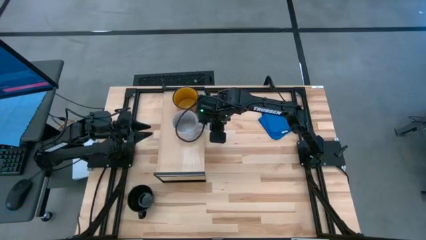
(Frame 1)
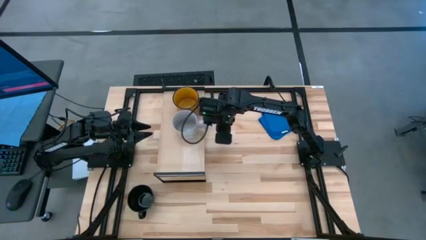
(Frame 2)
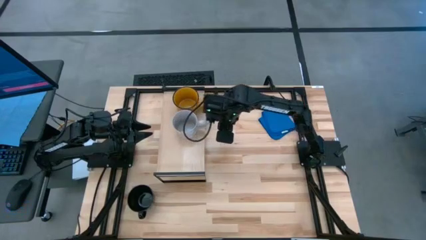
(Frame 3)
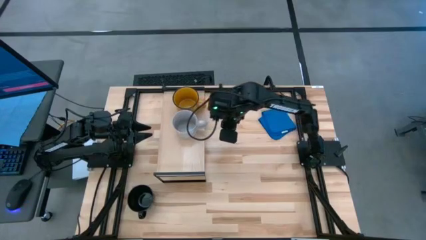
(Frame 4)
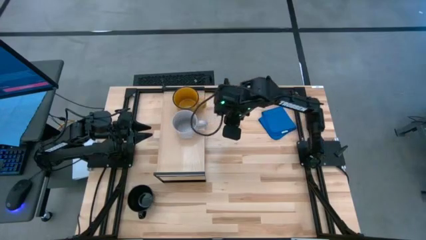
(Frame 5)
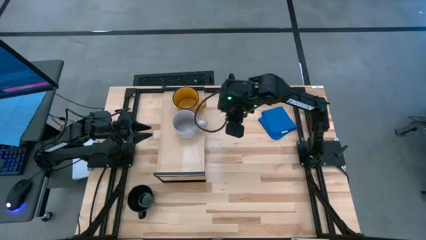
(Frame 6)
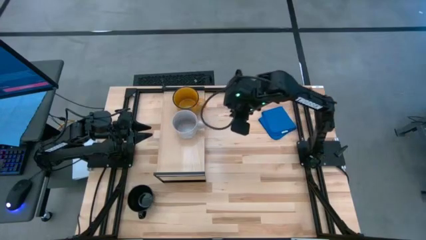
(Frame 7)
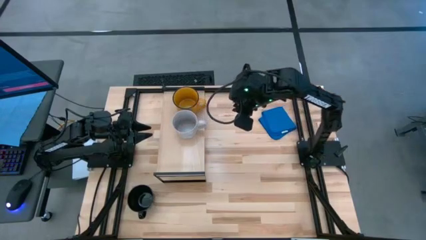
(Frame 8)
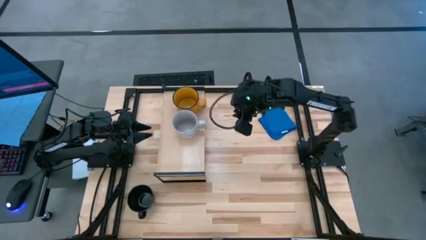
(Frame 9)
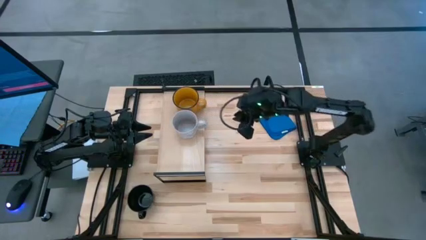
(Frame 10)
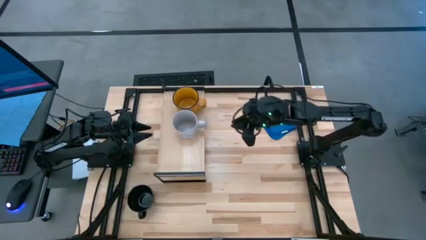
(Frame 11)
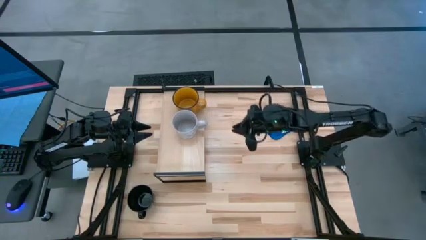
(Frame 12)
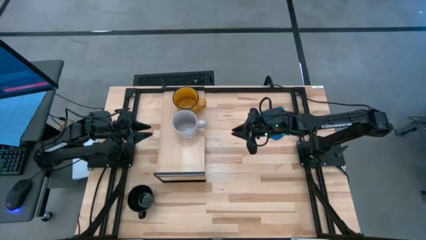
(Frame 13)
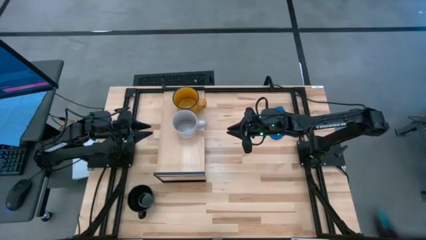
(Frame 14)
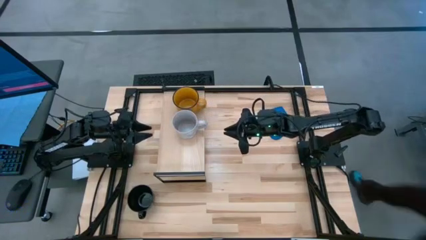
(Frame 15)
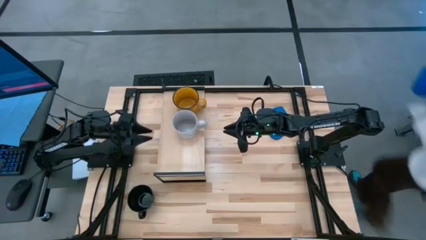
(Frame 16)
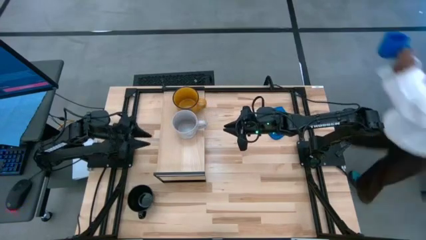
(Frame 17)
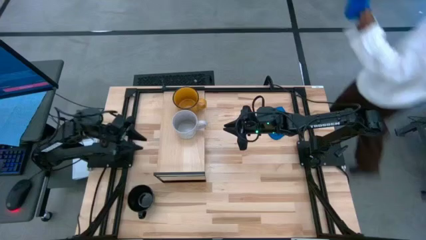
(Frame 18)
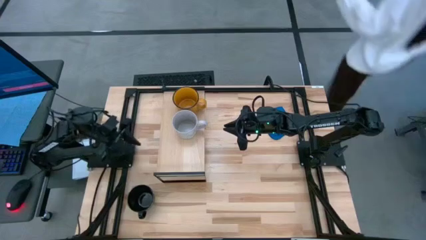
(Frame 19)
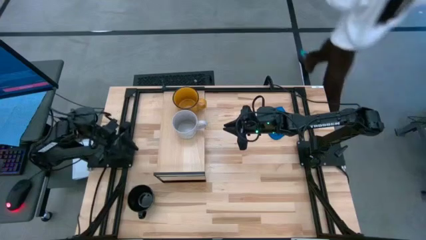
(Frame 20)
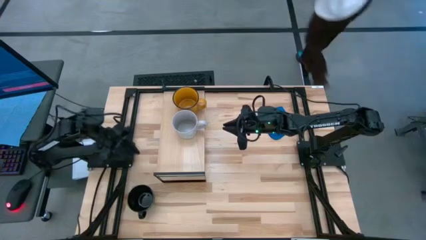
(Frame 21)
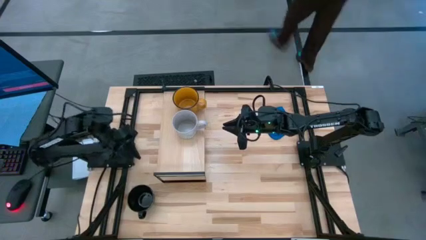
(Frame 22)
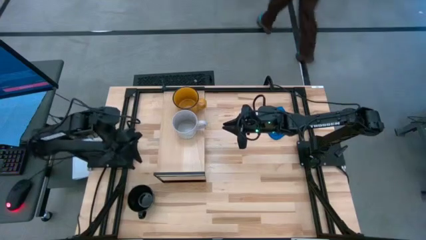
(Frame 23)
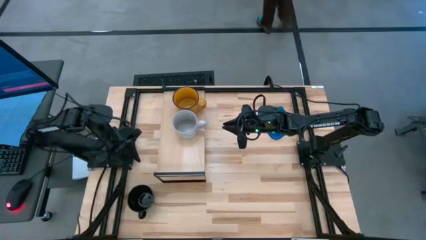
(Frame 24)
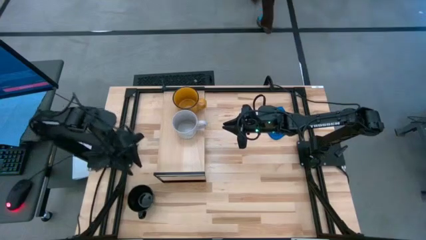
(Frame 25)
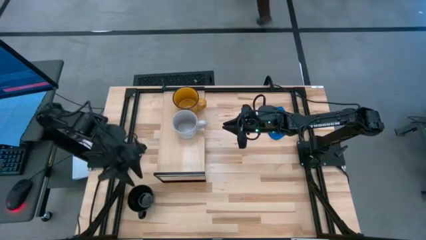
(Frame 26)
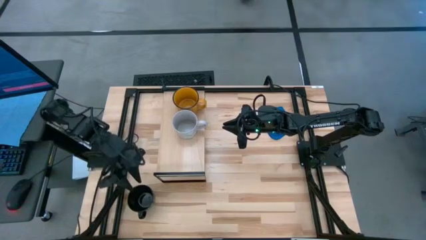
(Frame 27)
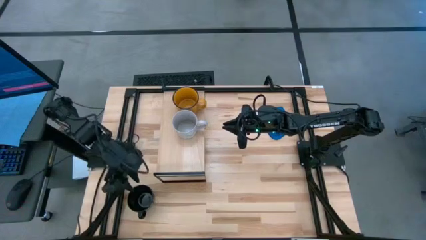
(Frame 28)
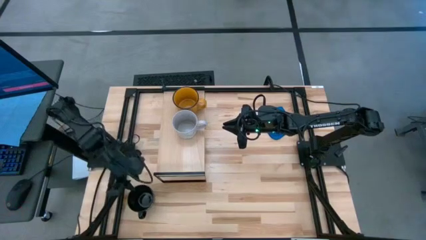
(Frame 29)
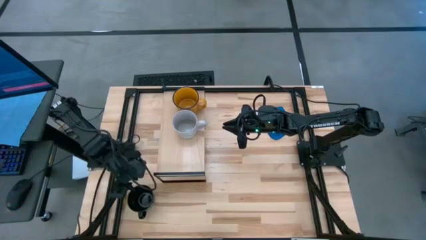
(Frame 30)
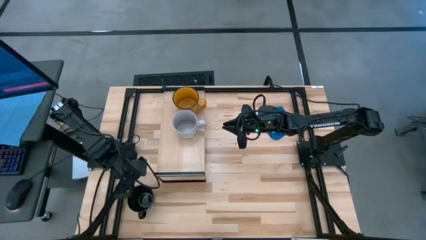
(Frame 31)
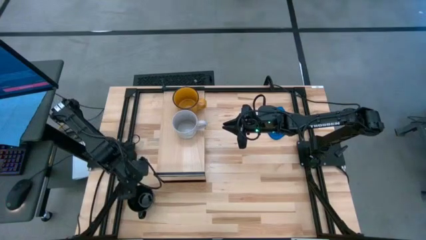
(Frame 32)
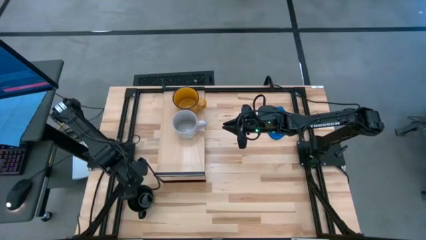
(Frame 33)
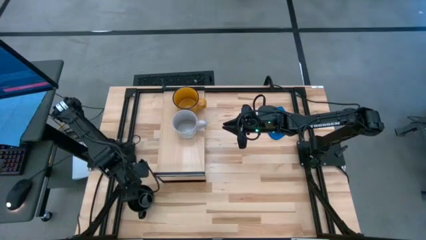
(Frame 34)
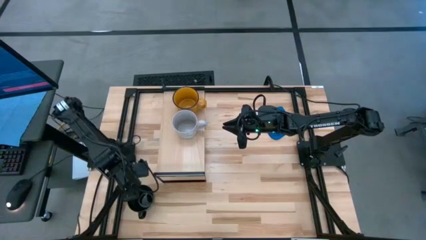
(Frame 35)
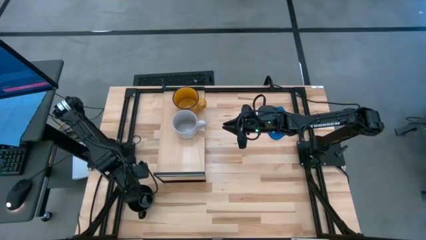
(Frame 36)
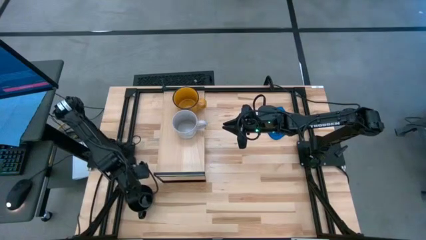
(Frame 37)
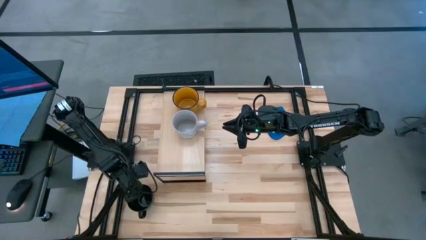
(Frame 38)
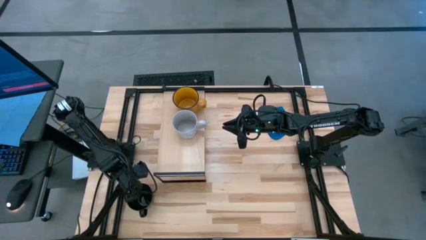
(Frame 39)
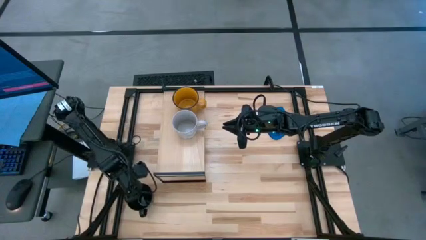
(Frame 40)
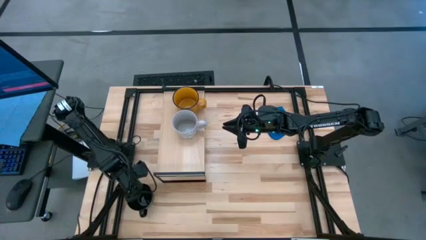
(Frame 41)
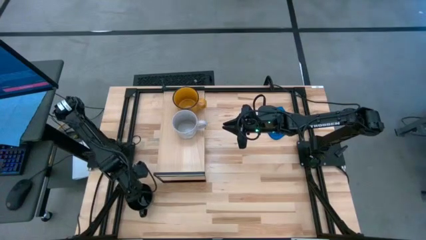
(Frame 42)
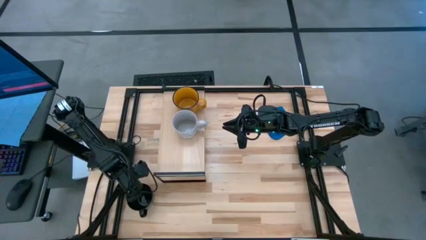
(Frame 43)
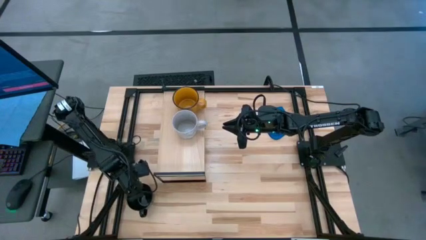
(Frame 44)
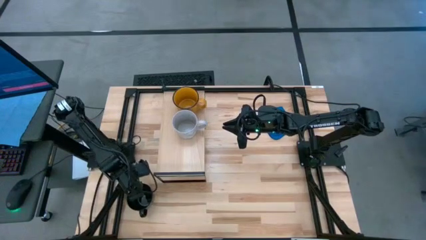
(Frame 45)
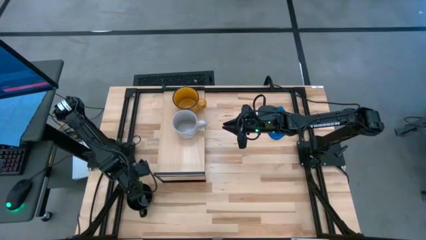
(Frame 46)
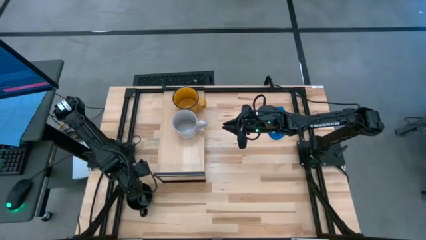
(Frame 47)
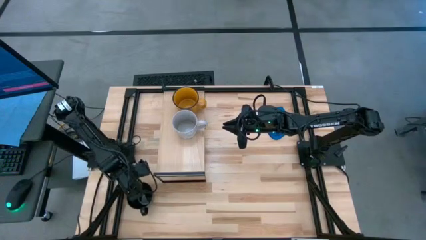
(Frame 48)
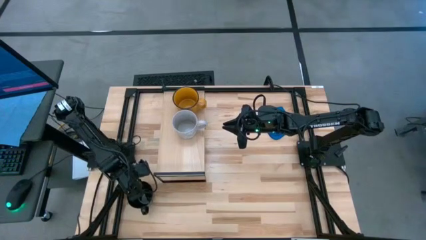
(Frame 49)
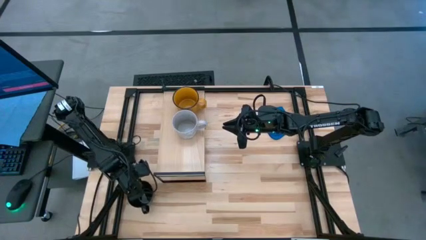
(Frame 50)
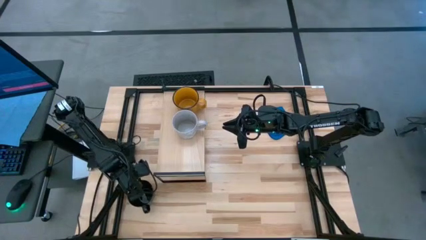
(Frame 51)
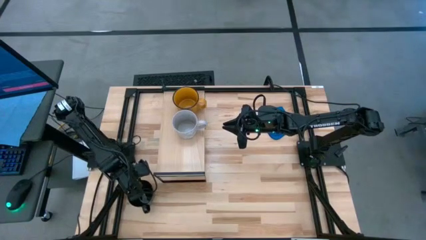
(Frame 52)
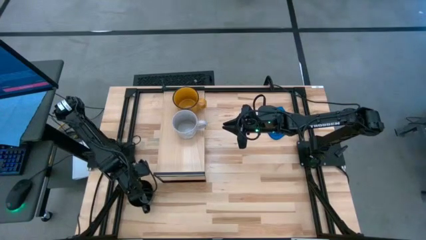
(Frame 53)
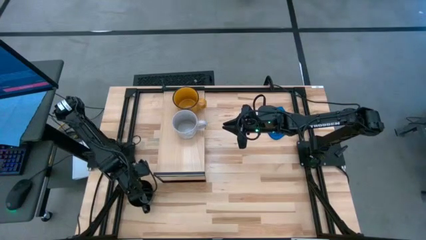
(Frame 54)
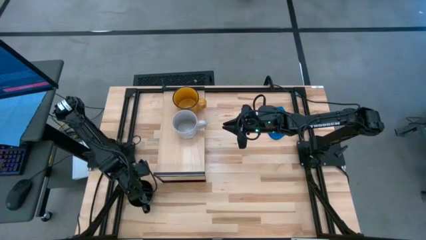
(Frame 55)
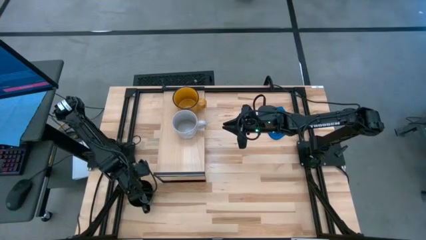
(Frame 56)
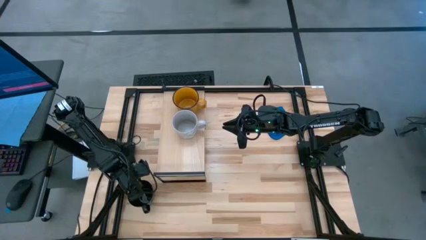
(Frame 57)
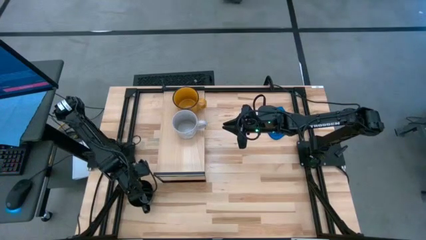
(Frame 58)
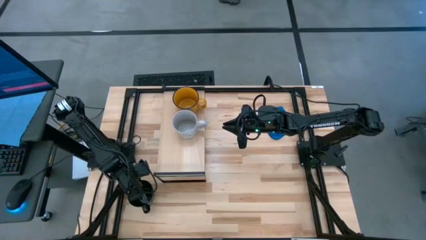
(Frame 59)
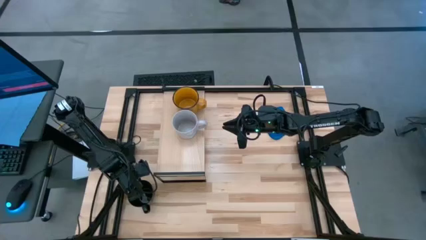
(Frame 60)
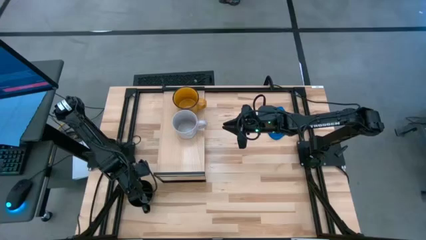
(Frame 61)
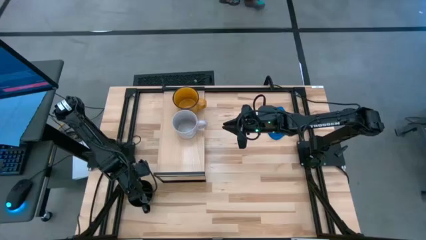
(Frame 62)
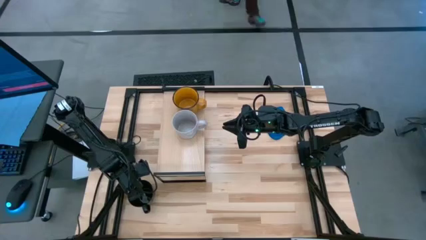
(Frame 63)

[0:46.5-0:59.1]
Task: Stack small to large cups/mugs on shelf
Put the black mug on the shelf
